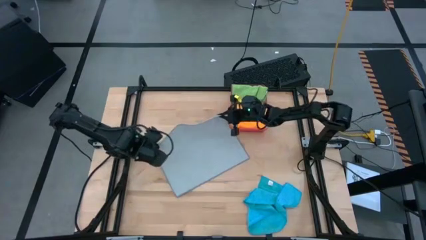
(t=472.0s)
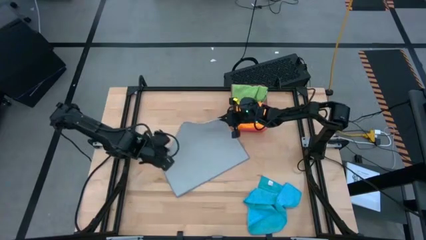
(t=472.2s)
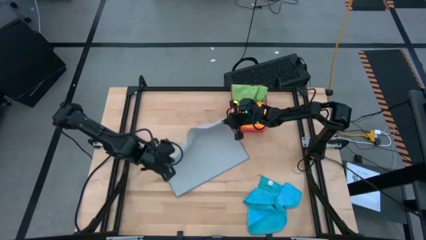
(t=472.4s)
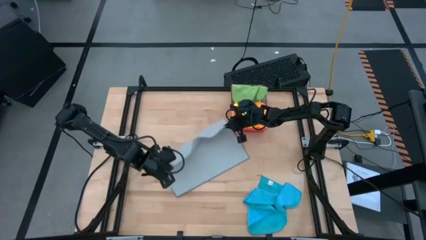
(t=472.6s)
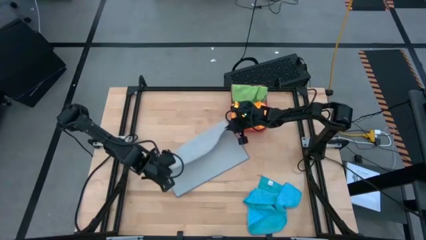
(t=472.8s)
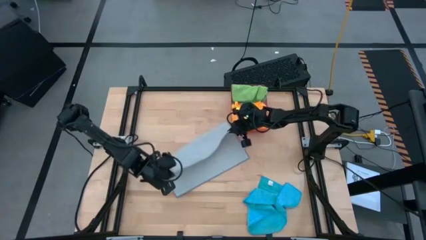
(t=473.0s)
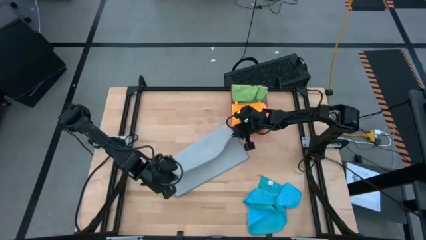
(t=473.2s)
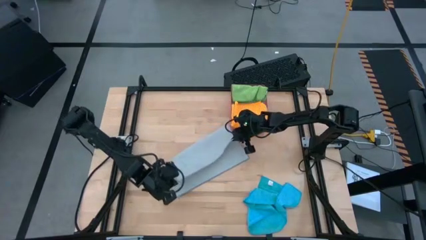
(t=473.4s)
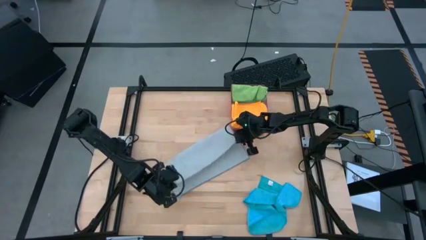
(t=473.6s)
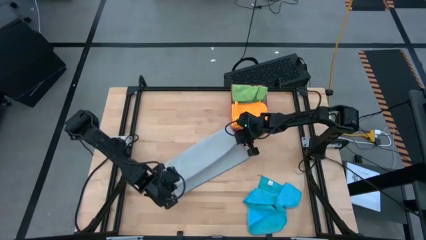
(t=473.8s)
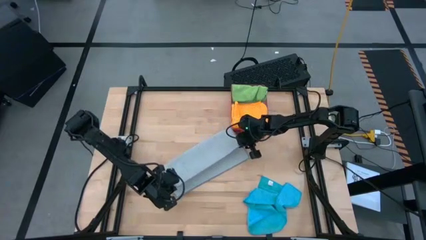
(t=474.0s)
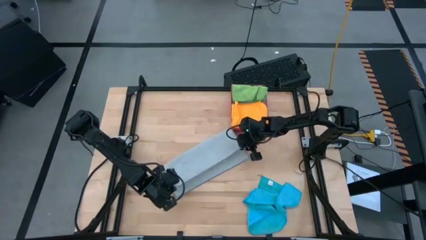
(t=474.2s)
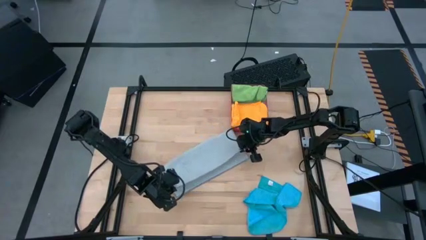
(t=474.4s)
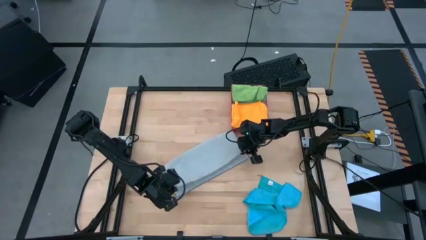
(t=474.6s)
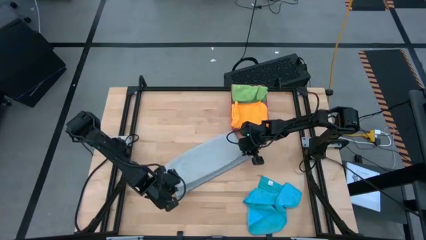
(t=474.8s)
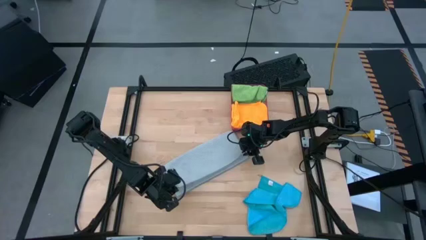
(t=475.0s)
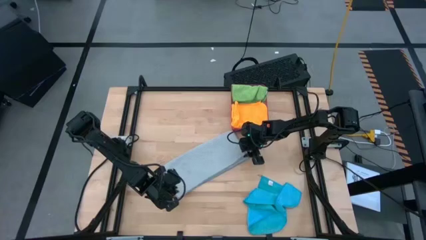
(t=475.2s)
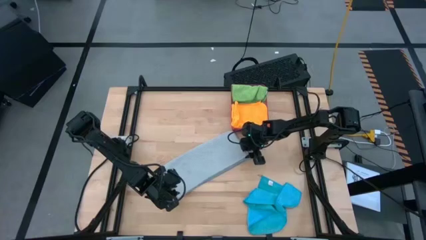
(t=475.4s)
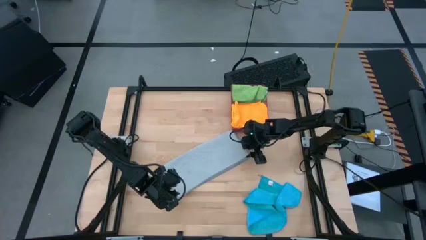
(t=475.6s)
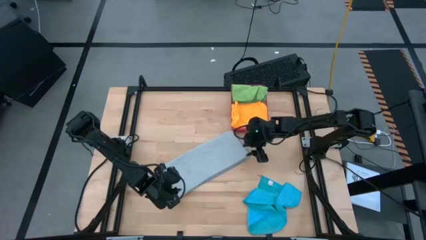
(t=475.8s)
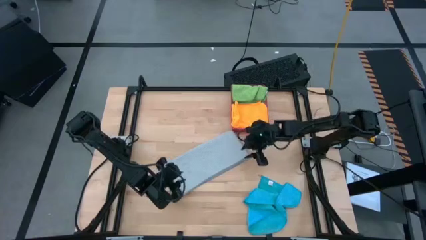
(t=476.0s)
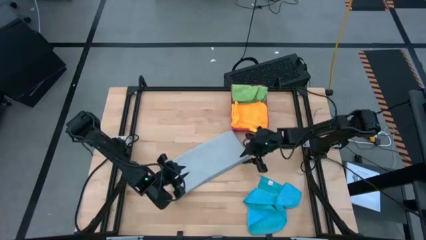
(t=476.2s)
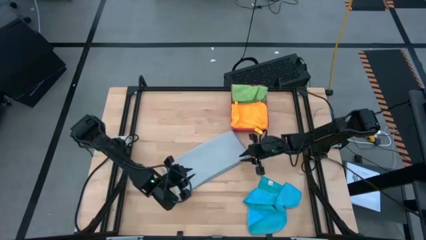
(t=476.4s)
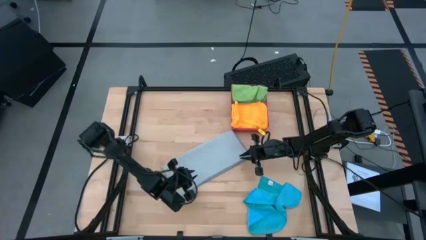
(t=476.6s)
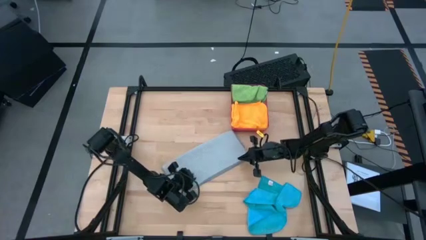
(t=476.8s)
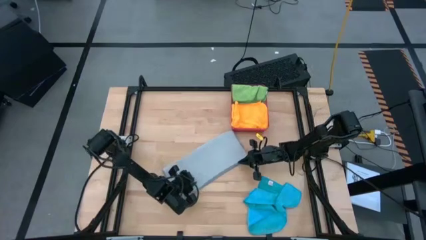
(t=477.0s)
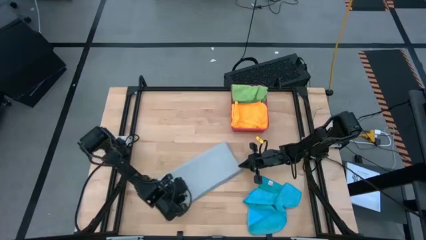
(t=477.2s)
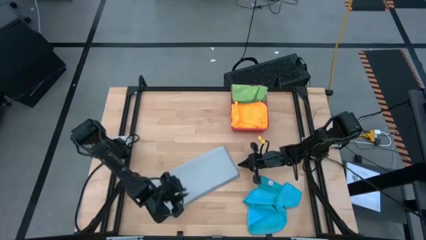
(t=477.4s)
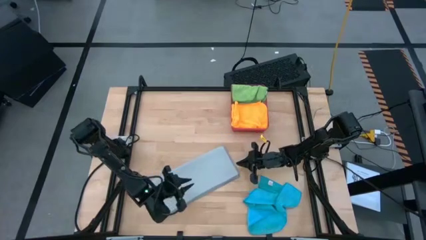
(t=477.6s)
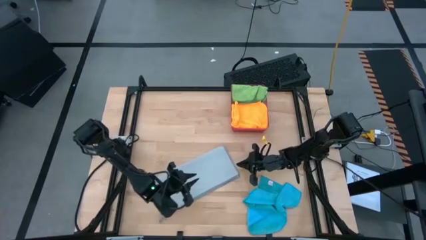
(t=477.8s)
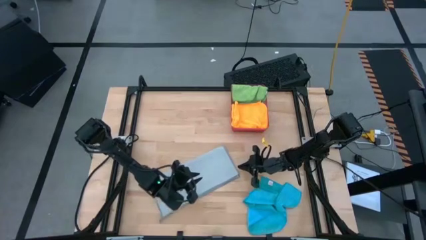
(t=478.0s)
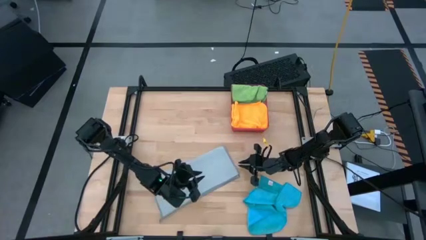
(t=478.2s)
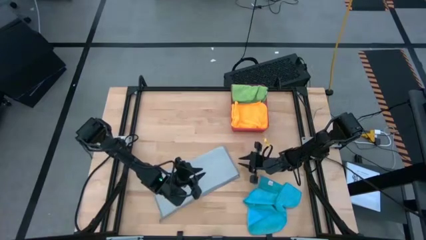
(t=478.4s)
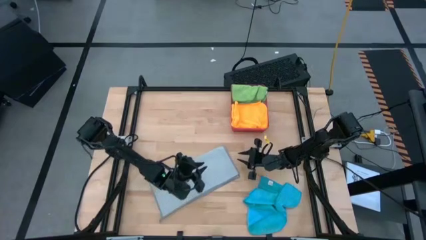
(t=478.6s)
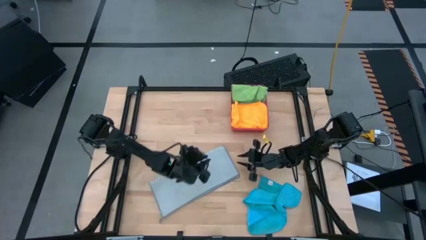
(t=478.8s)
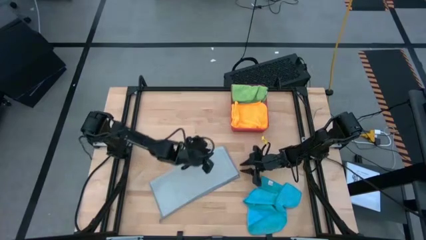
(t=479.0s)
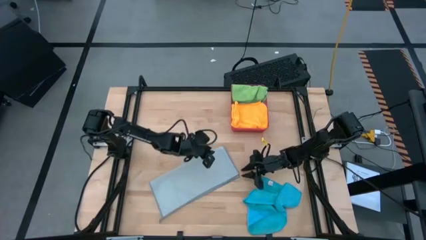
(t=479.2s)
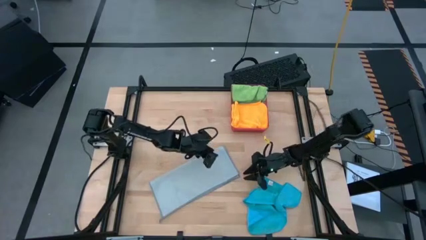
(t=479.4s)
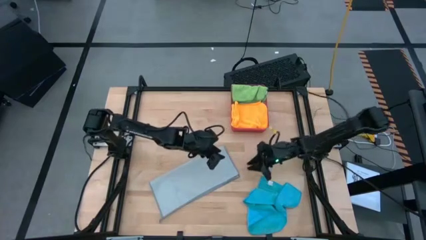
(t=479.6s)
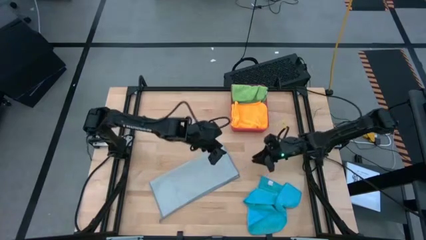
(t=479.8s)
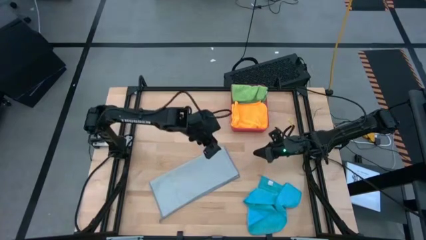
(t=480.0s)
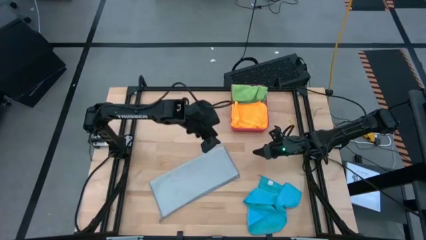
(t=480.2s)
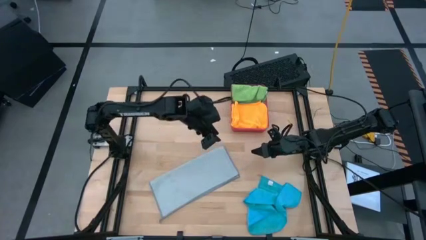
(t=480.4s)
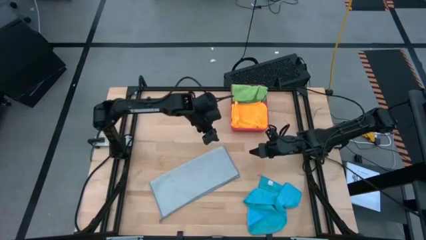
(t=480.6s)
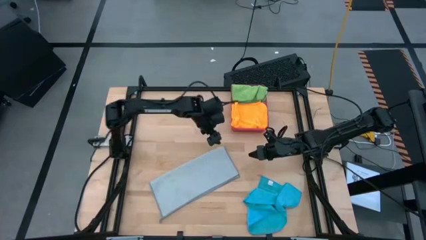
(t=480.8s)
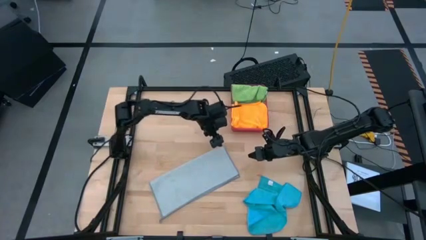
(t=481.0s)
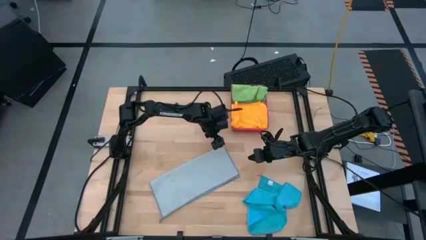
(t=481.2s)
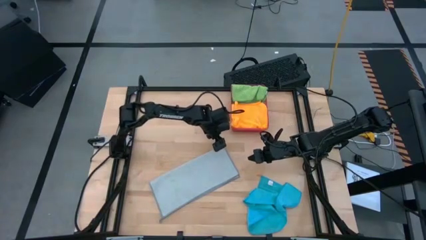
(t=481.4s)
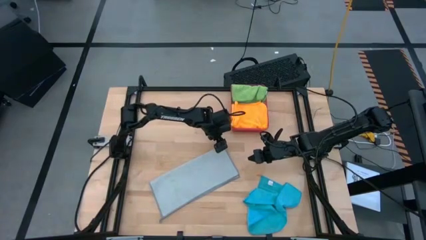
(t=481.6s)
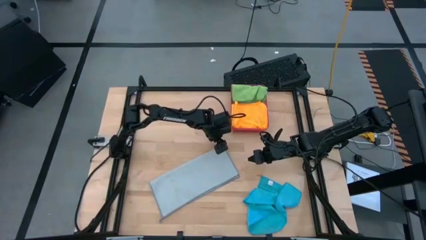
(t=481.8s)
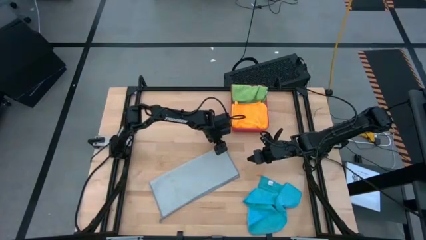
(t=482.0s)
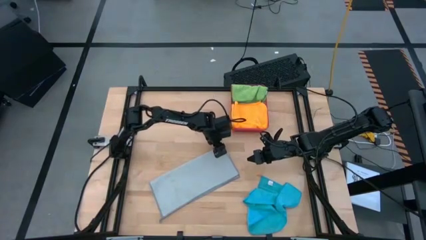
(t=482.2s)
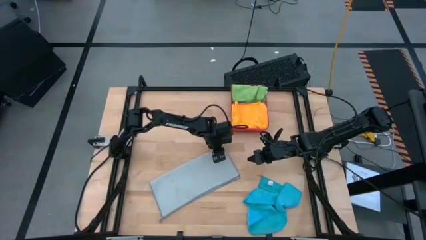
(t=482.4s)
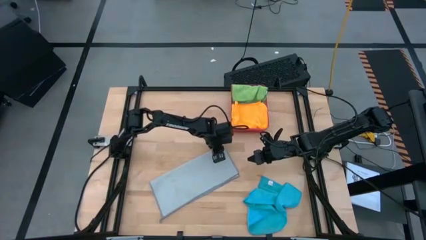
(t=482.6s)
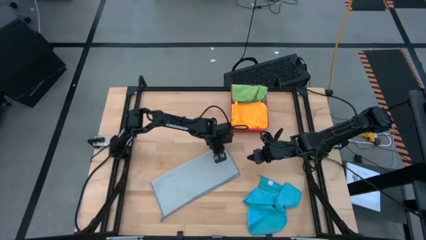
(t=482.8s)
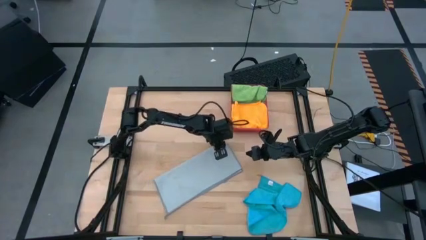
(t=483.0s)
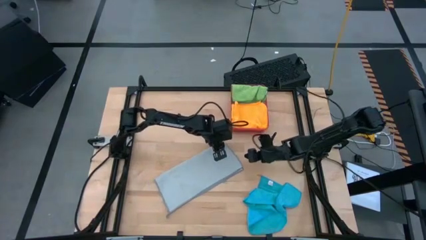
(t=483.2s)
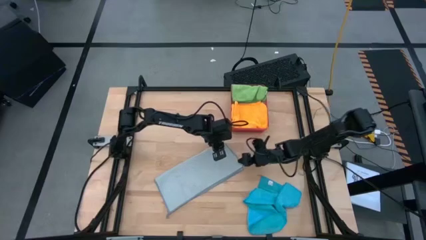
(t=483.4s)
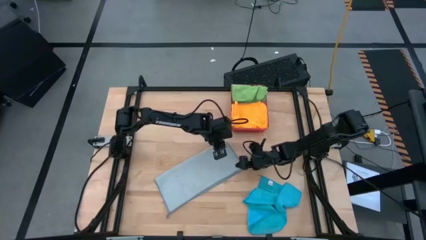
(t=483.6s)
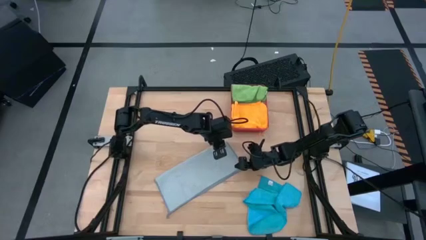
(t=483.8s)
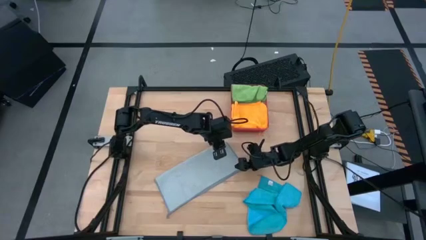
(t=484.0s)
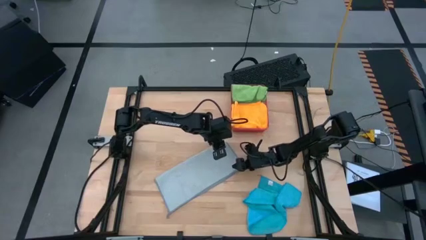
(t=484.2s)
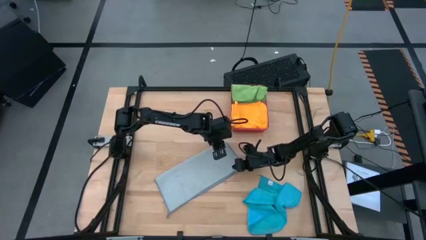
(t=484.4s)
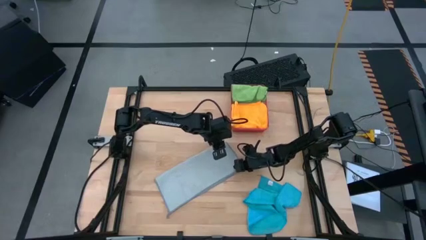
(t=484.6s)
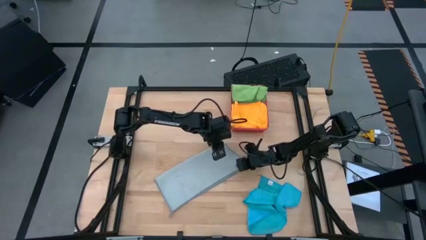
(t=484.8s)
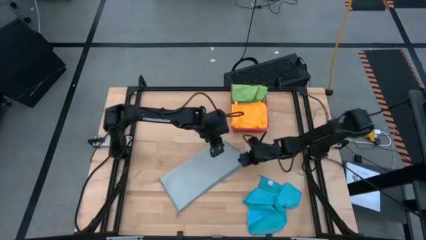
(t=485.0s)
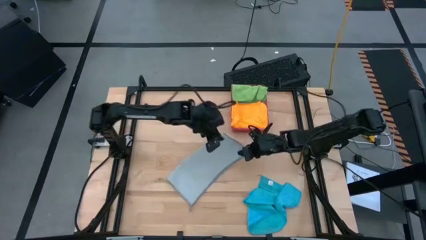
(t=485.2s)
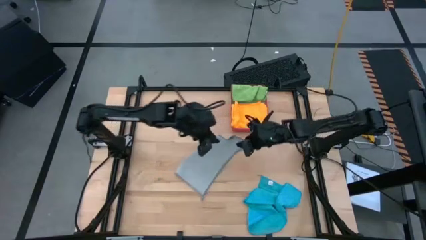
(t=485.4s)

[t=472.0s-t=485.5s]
Task: Fold microfiber towels
Fold the gray microfiber cloth

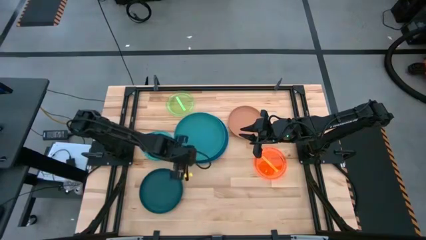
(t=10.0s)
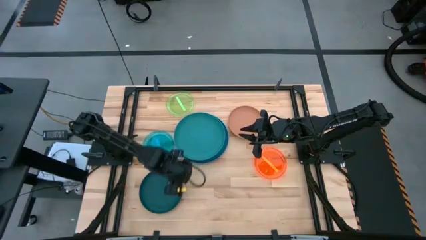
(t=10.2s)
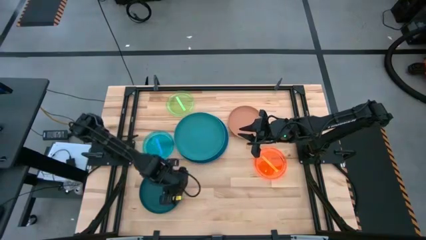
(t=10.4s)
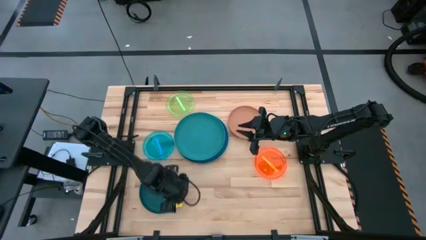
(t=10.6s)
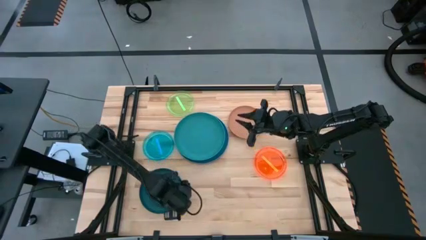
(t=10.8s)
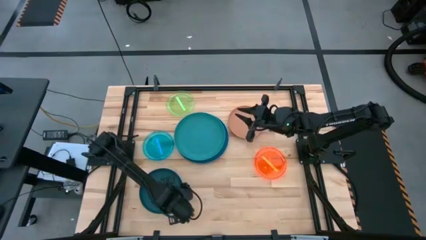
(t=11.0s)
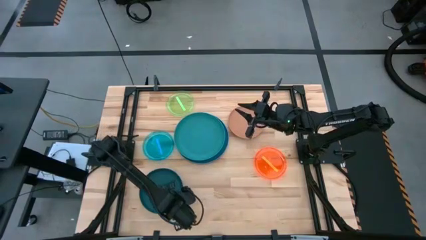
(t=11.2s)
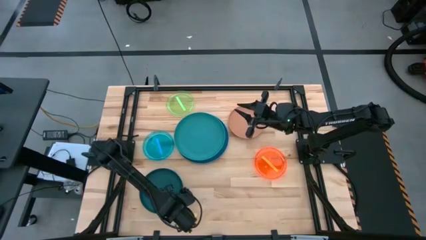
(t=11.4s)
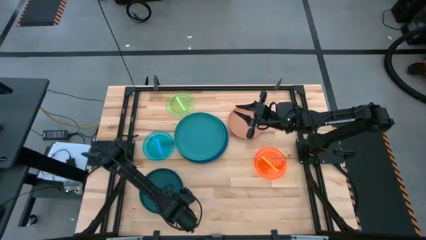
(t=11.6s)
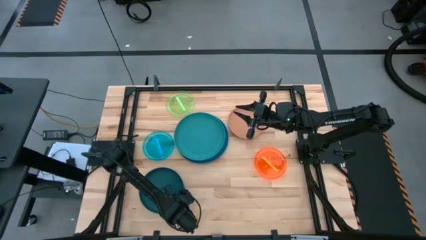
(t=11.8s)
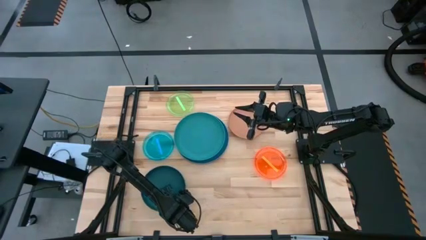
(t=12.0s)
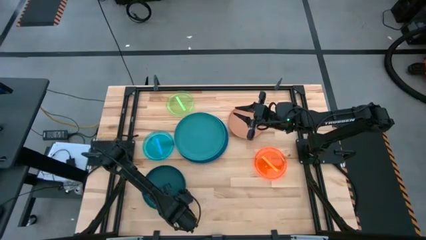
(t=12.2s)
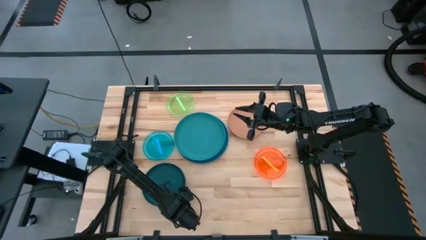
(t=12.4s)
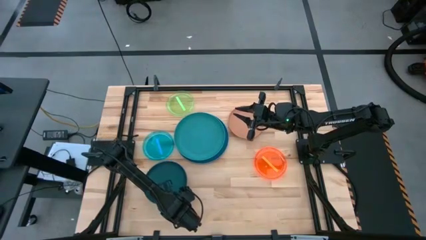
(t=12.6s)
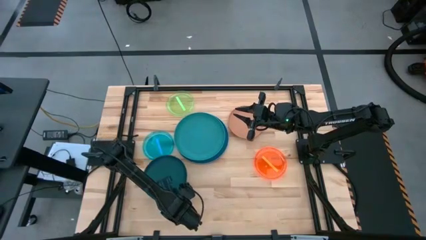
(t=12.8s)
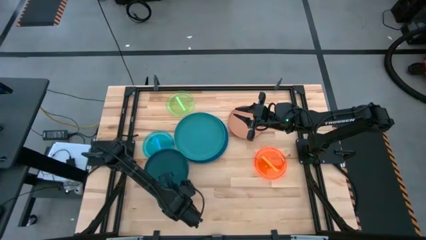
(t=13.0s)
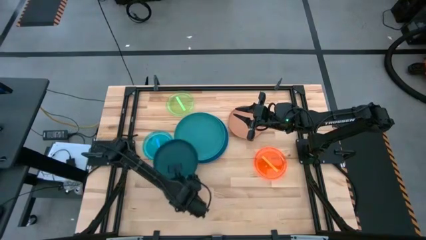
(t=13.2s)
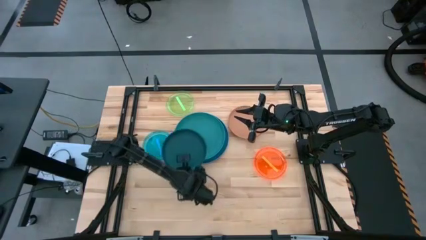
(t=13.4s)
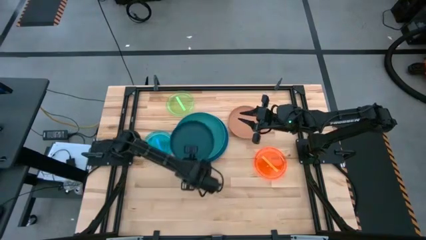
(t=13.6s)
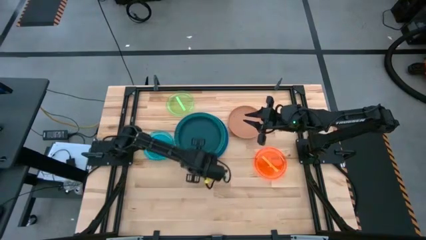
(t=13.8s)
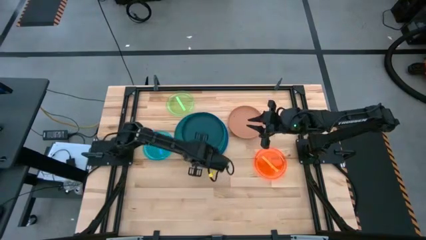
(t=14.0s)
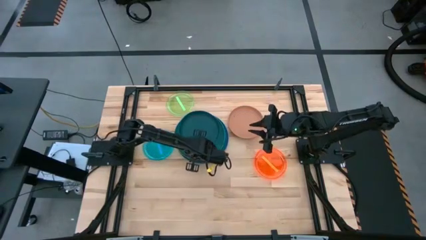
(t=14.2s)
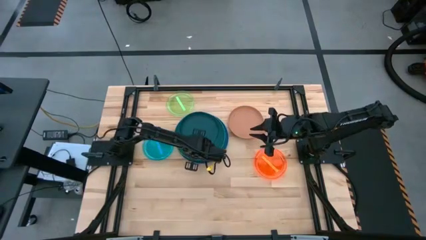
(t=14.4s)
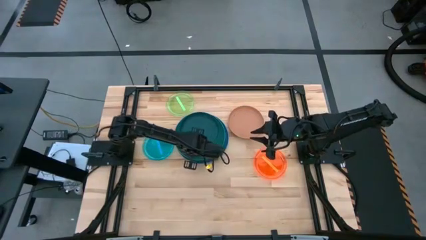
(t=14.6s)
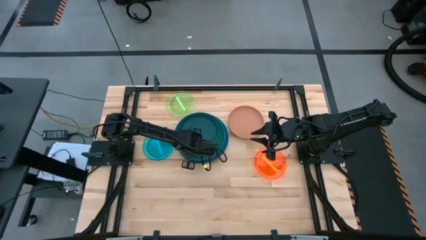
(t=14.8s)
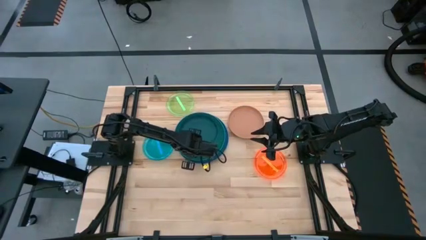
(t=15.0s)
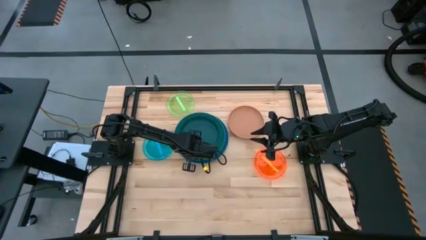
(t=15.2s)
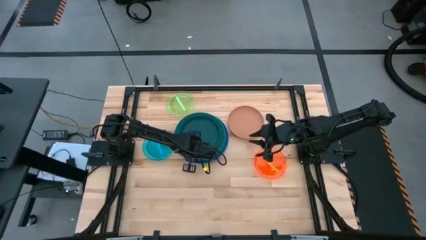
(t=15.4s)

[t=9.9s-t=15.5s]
Task: Stack plastic plates
Stack the dark green plate on top of the green plate
